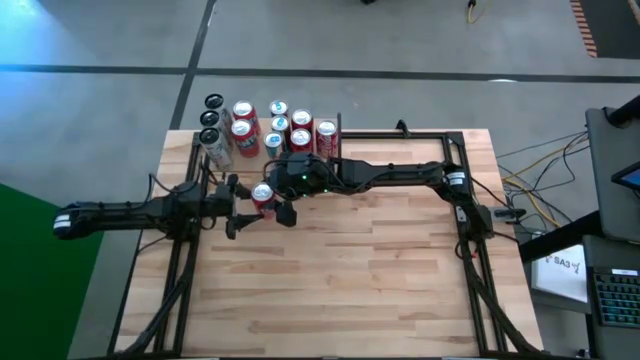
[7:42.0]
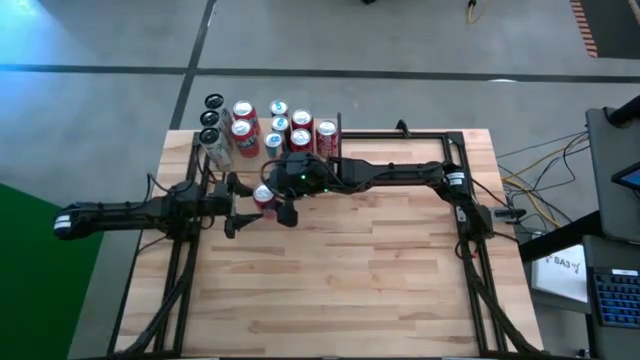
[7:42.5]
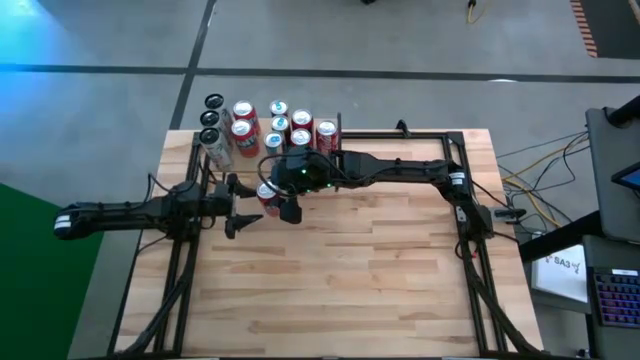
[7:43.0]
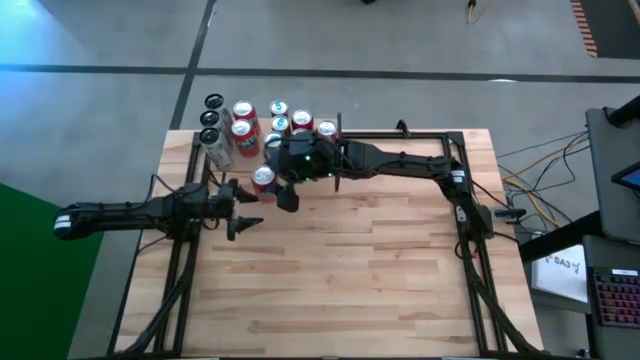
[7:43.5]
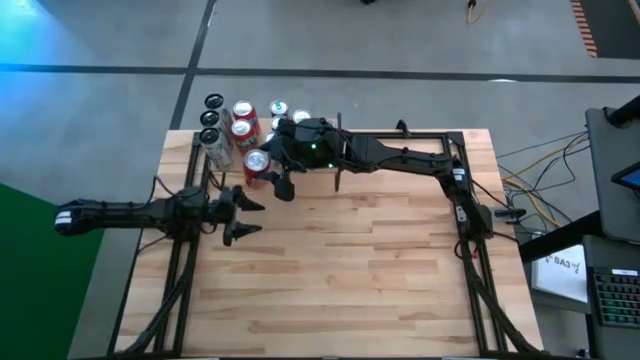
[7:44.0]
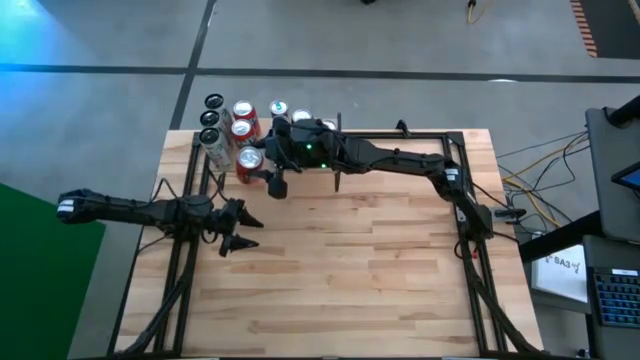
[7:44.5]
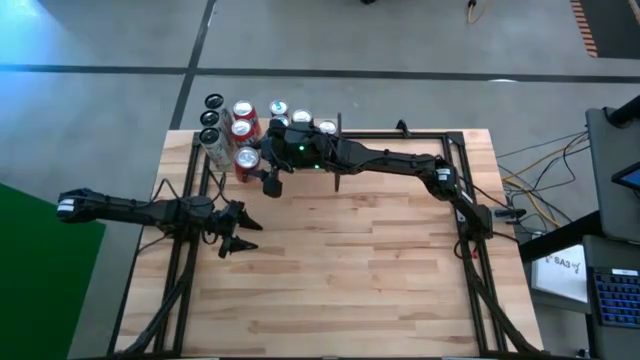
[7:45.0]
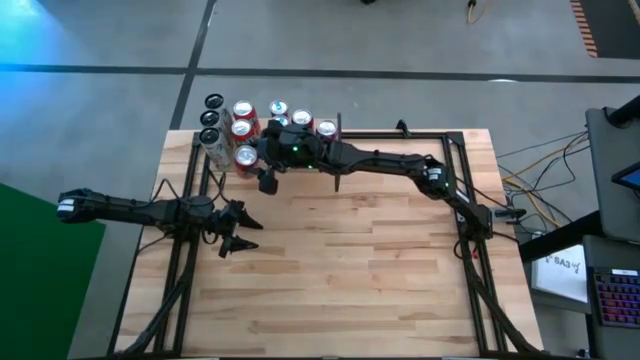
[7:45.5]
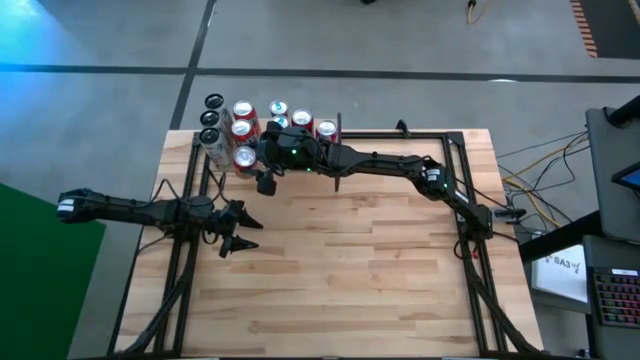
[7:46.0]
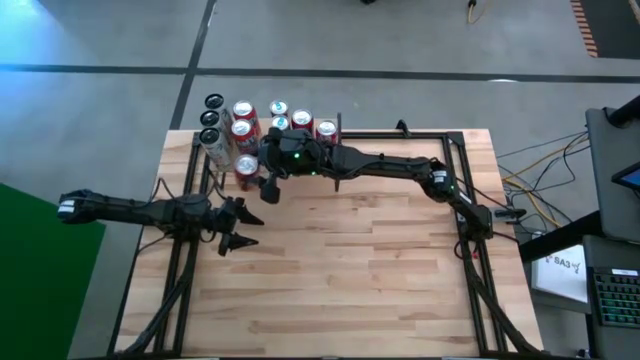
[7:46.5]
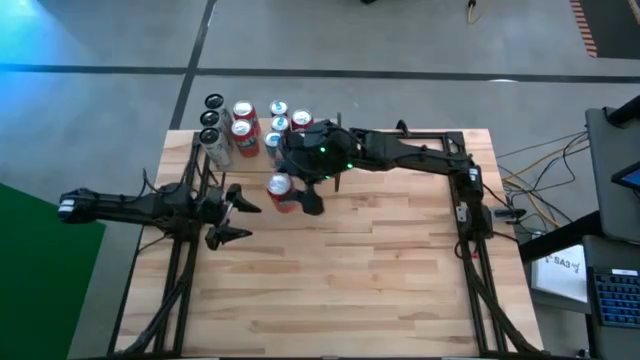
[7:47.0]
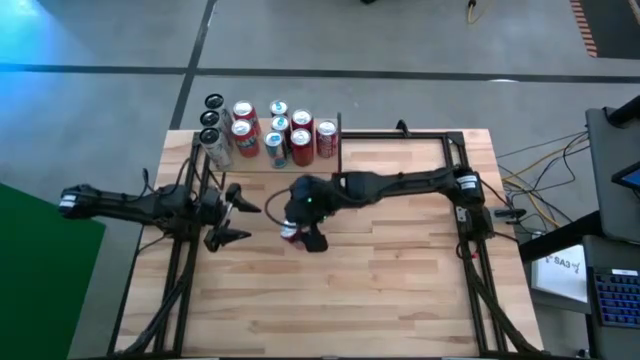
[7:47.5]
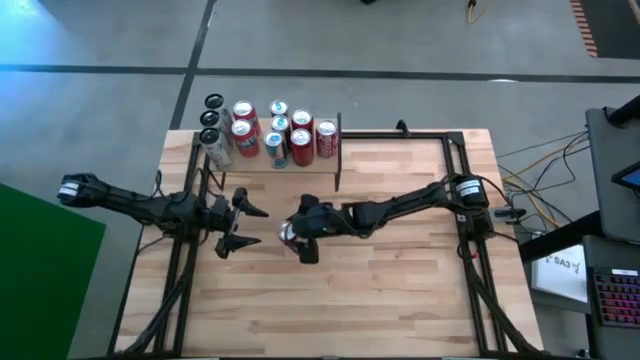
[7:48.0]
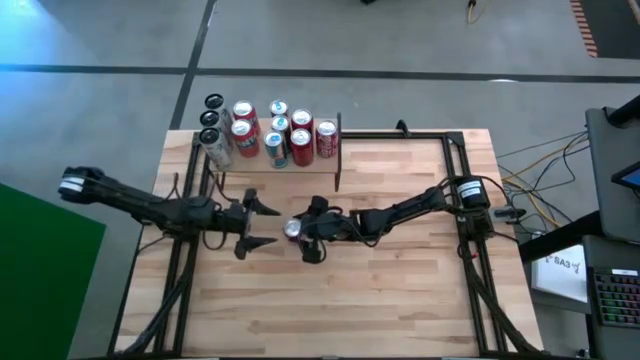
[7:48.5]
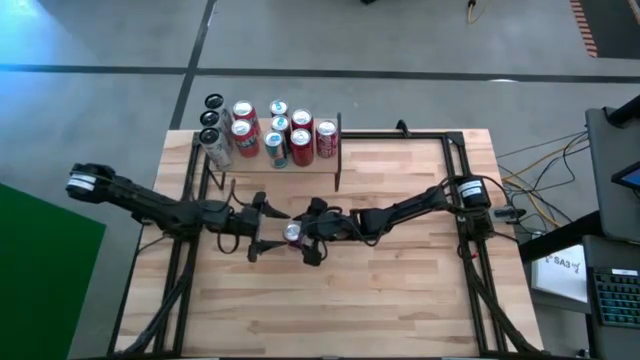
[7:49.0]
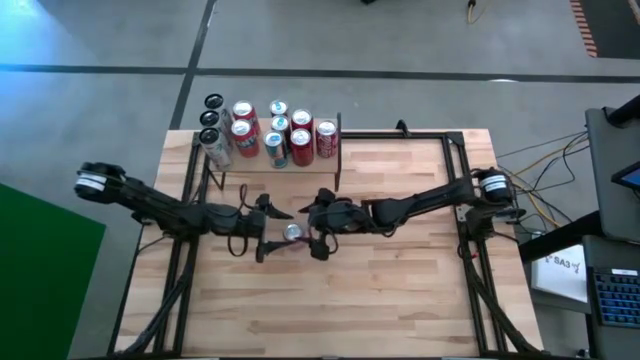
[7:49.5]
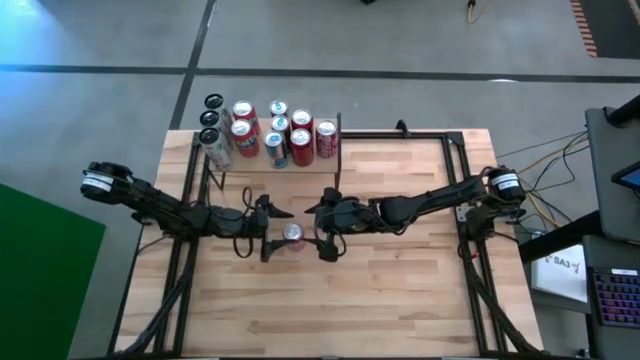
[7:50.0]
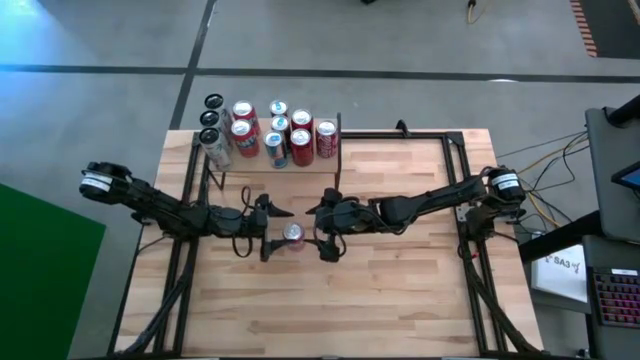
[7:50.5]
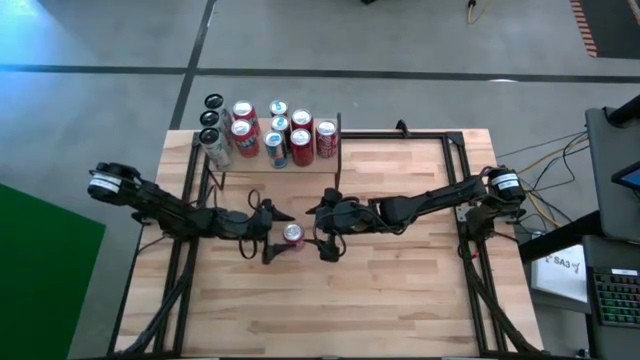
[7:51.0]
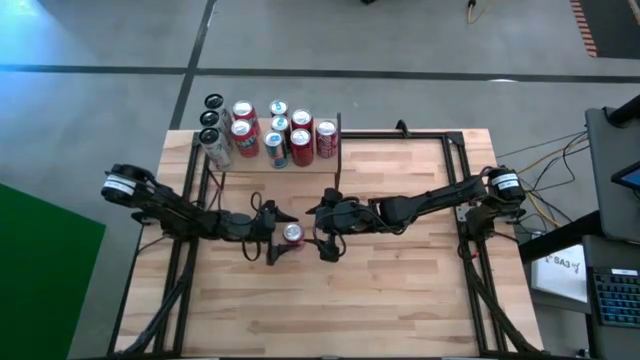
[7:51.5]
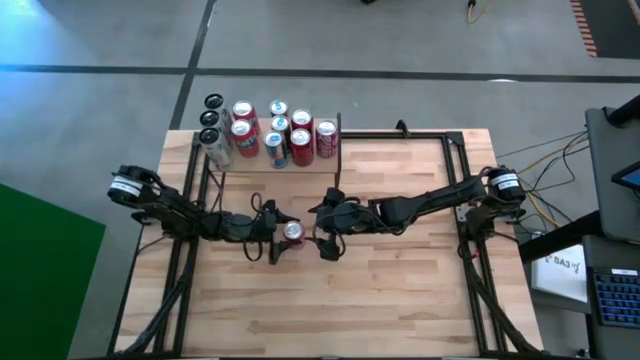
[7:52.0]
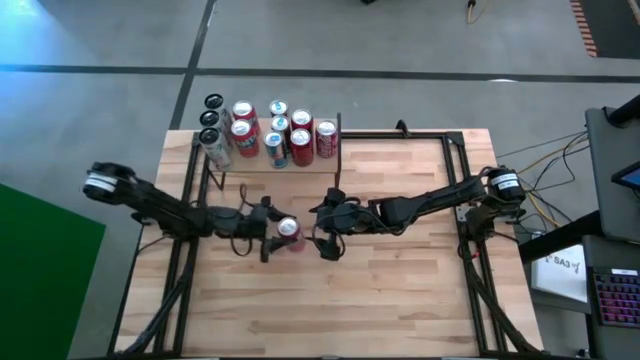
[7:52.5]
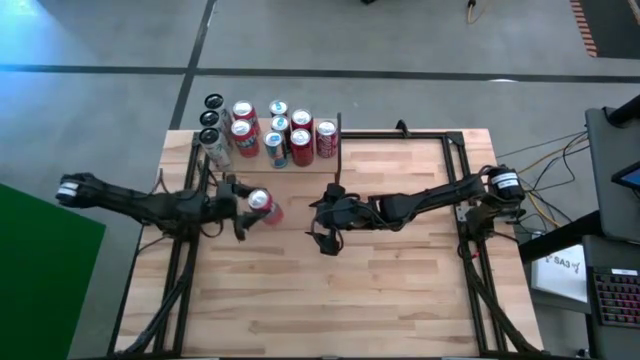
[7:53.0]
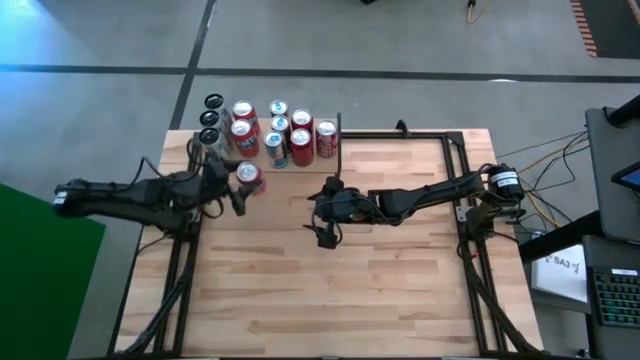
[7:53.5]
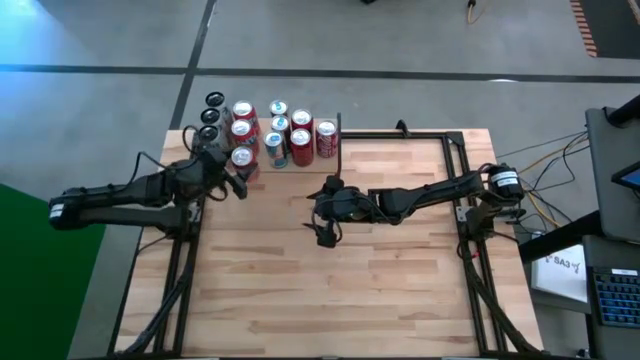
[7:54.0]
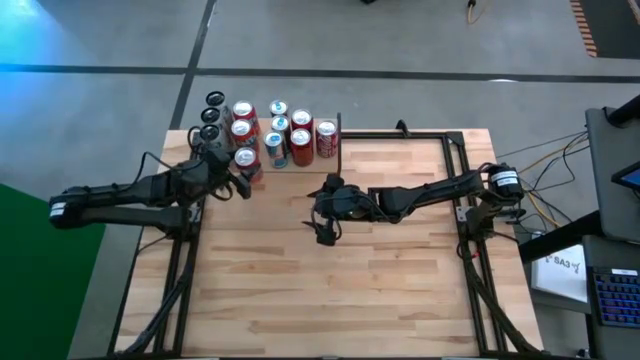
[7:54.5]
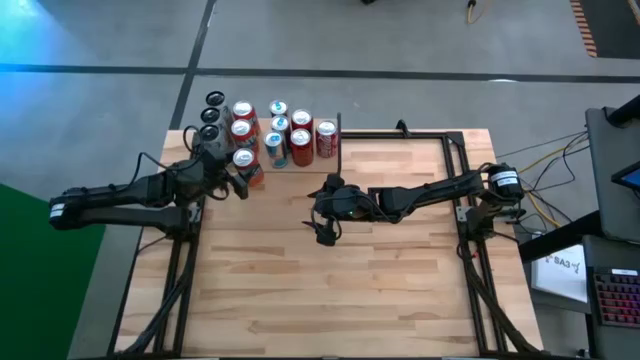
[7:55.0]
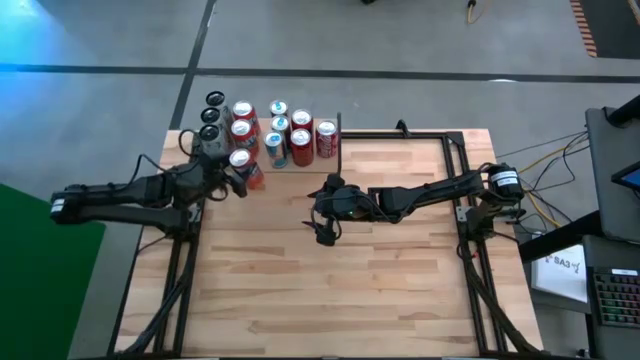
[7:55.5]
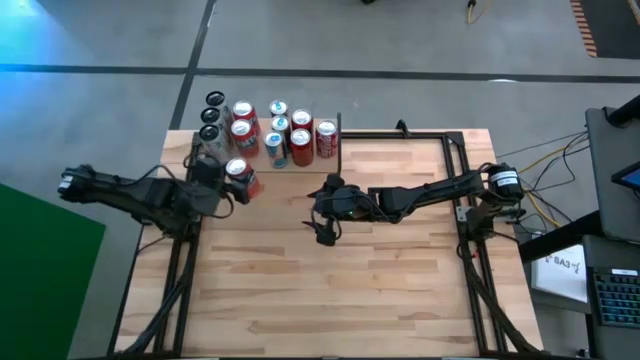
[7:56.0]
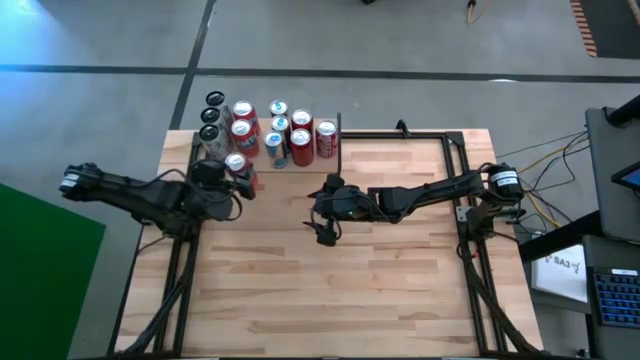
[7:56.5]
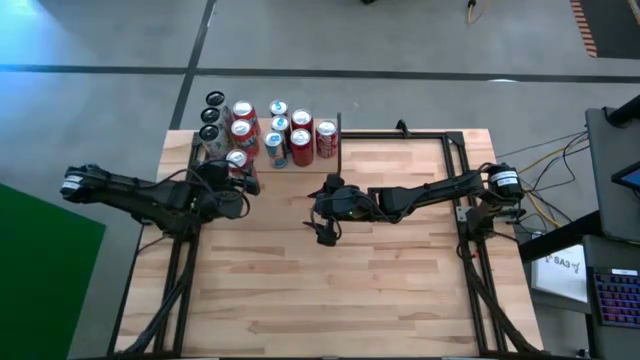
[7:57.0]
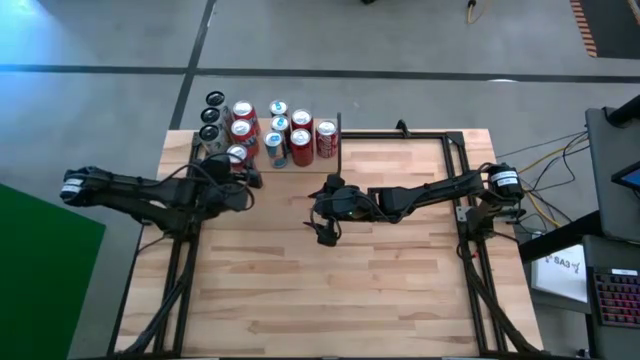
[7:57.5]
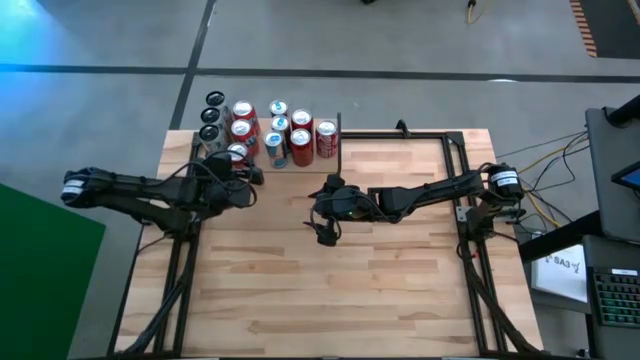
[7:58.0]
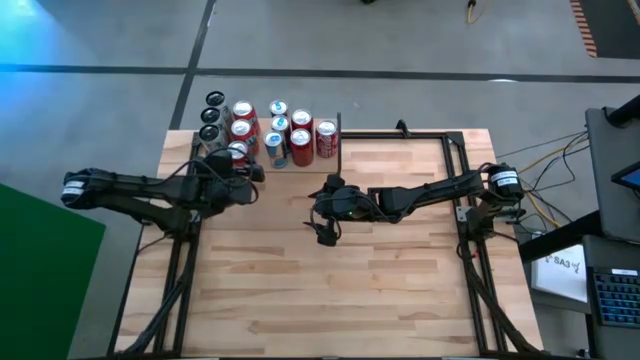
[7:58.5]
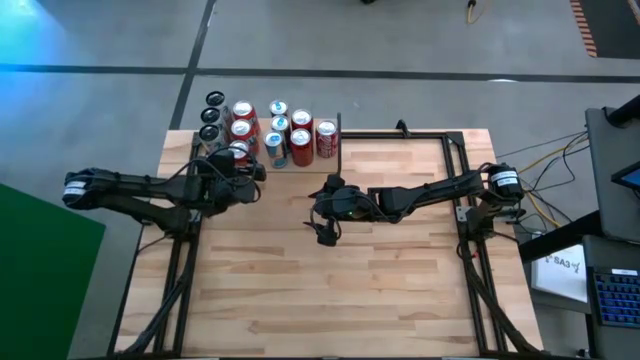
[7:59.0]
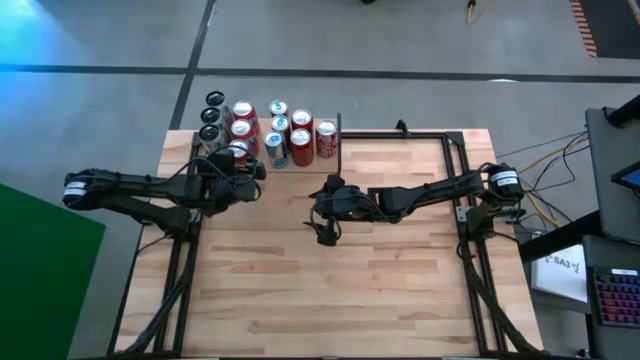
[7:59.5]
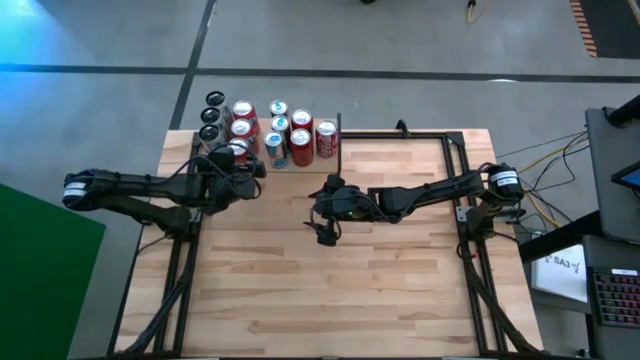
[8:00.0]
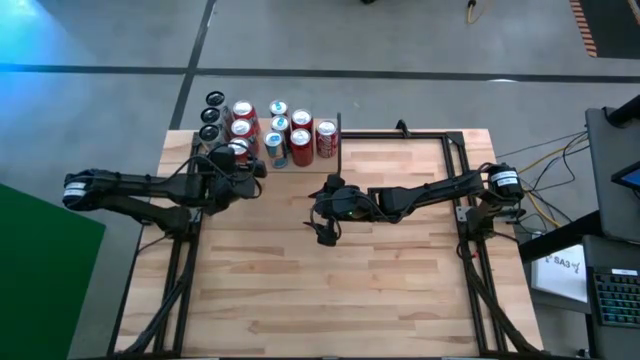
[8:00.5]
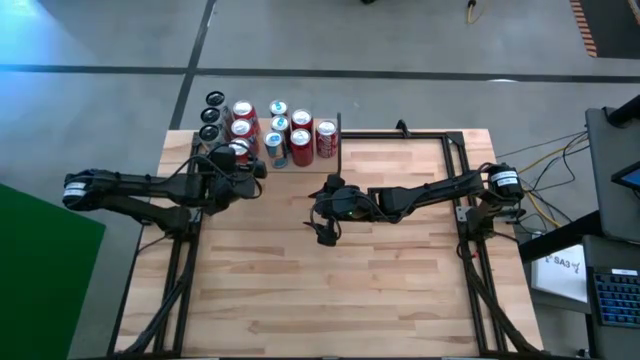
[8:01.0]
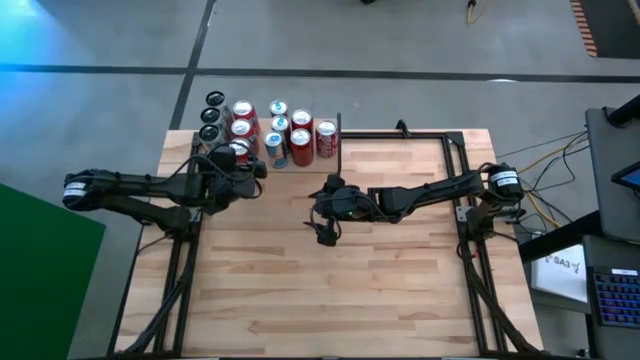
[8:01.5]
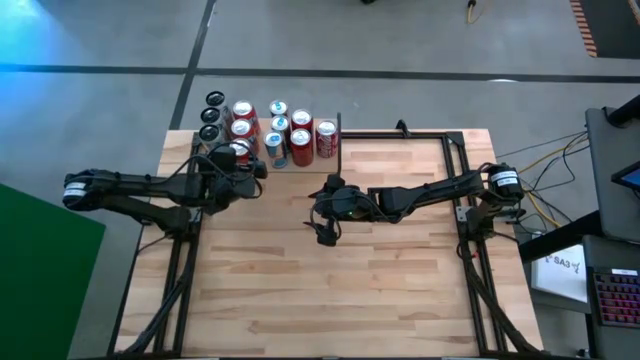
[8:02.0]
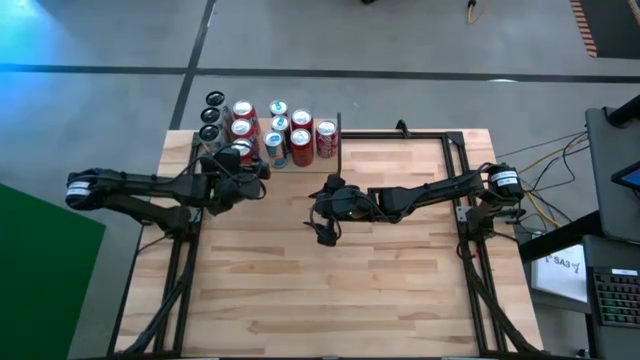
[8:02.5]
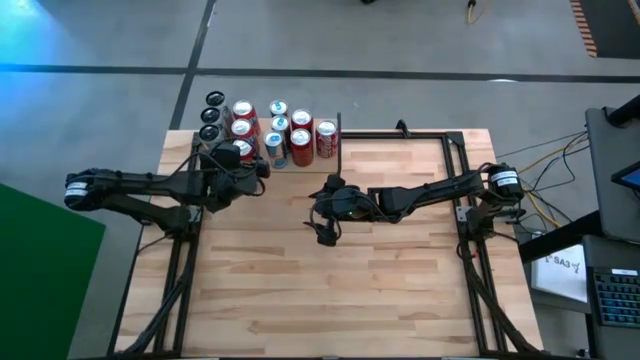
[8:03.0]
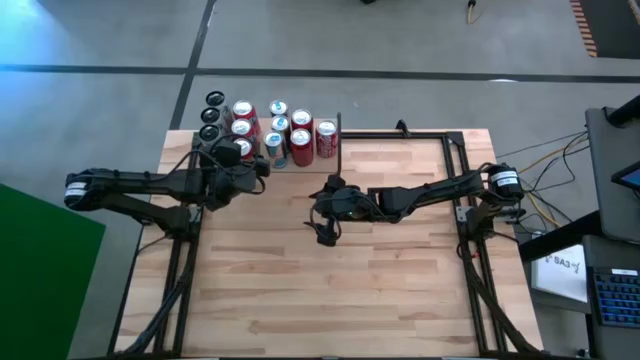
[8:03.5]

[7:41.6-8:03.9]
Task: Place canned beverage on shelf
Put the red soda can on the shelf aligned with the other red soda cans

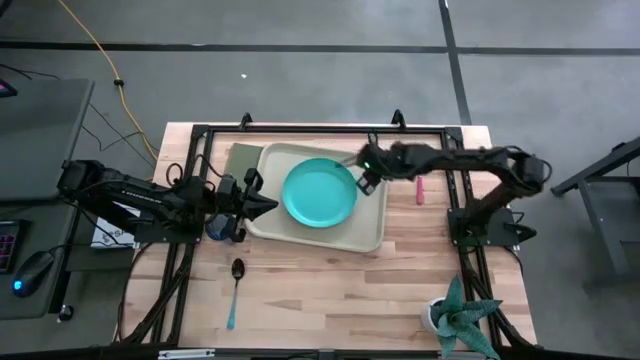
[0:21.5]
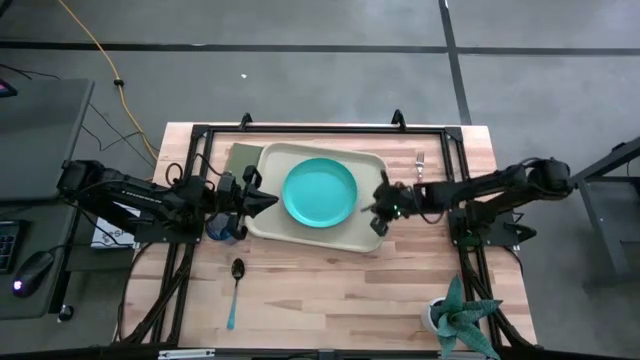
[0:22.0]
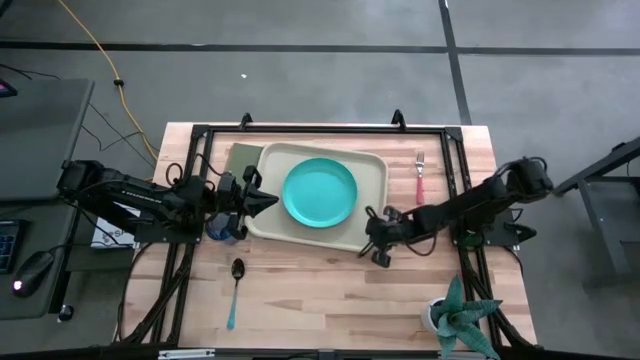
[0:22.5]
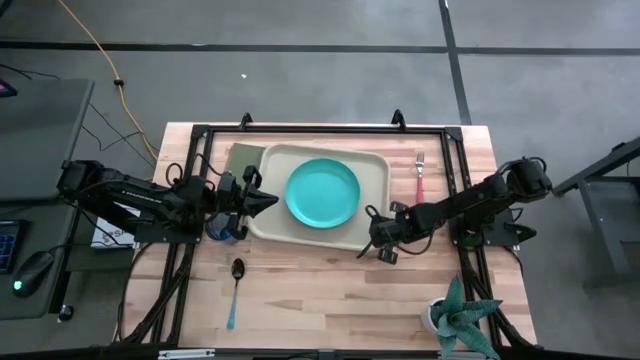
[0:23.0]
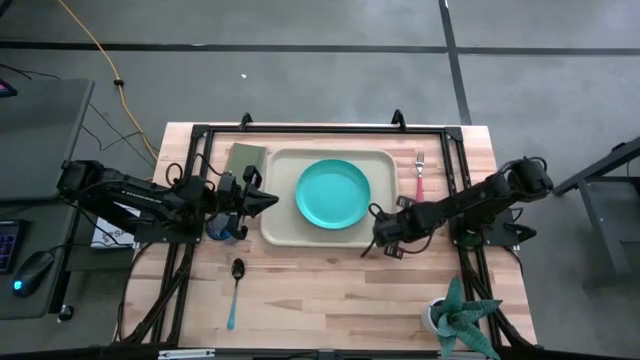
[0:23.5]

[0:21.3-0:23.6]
Task: Pick and place plate/cup/fork/spoon on tray
Adjust the gray tray
